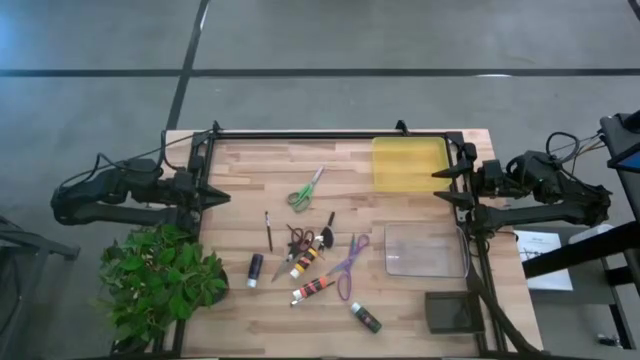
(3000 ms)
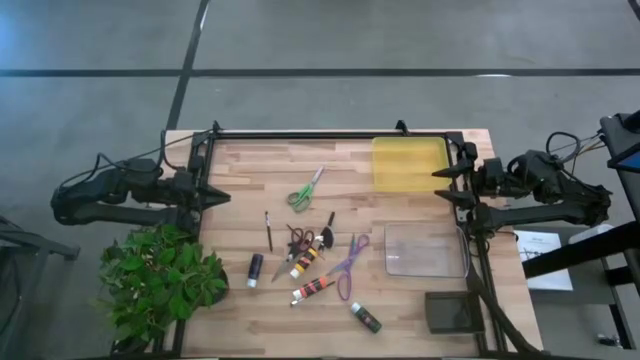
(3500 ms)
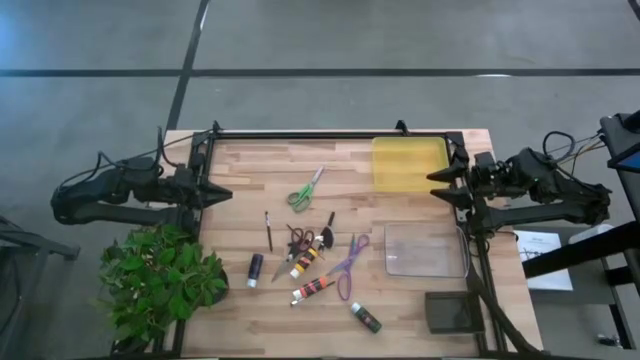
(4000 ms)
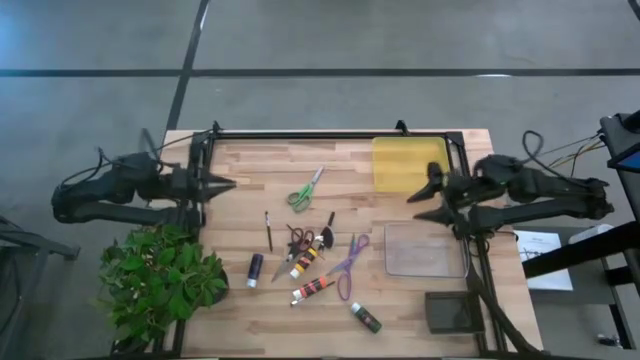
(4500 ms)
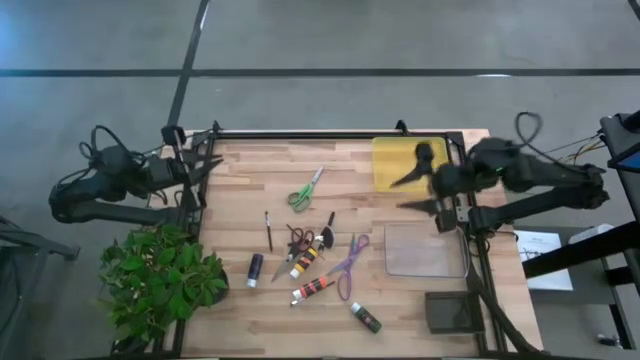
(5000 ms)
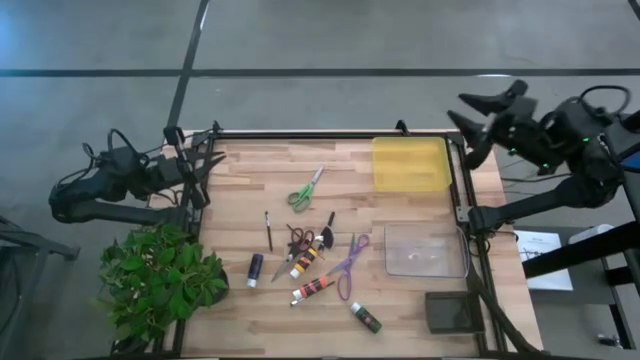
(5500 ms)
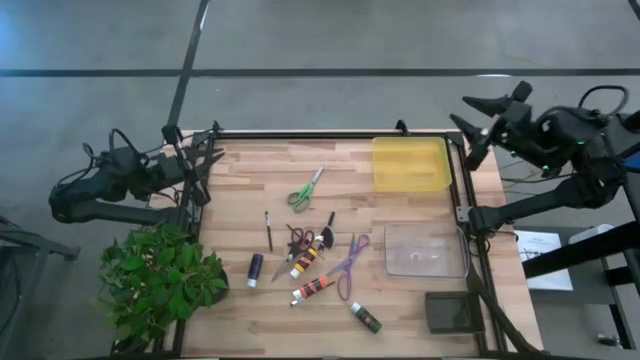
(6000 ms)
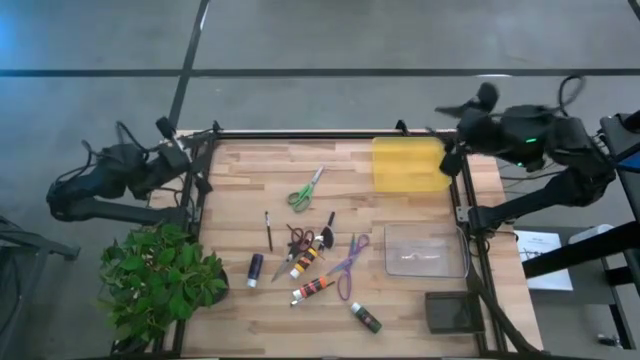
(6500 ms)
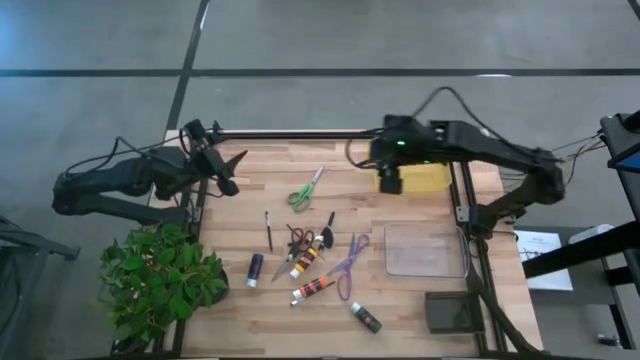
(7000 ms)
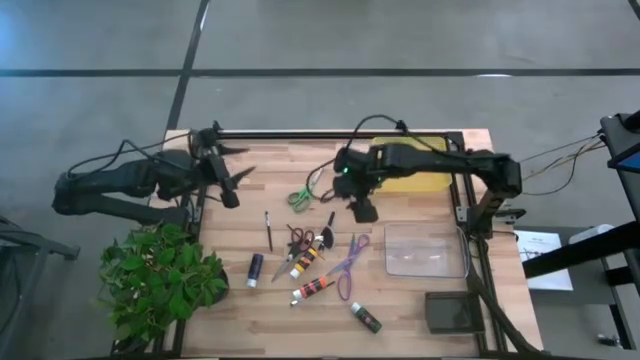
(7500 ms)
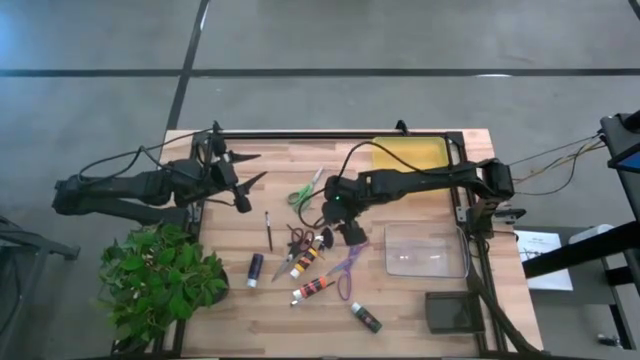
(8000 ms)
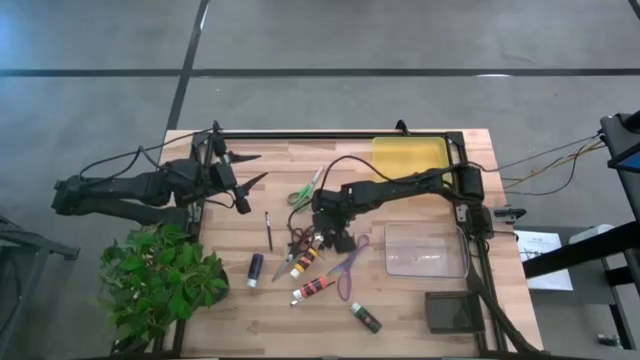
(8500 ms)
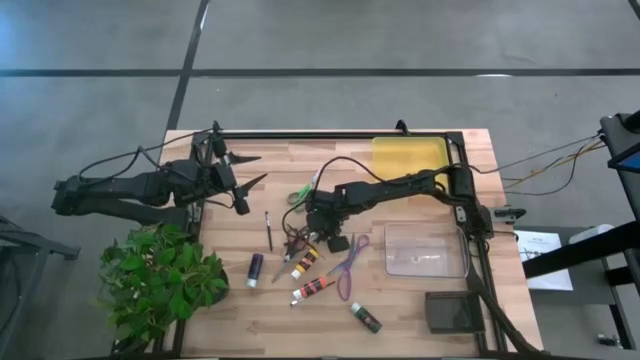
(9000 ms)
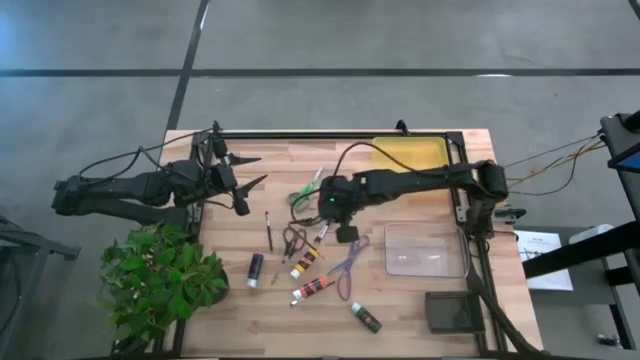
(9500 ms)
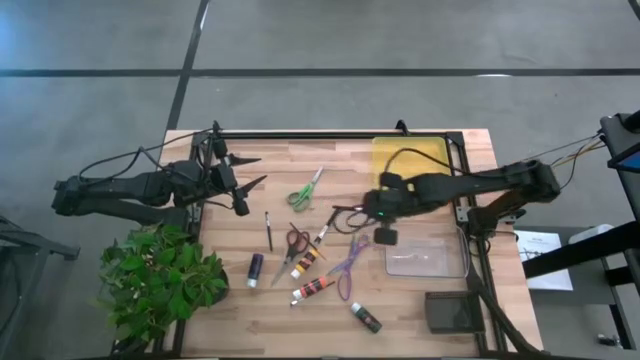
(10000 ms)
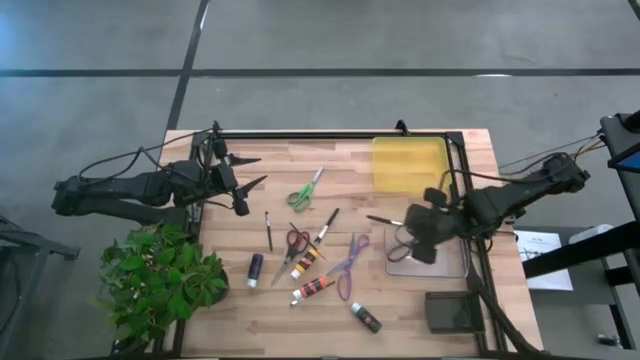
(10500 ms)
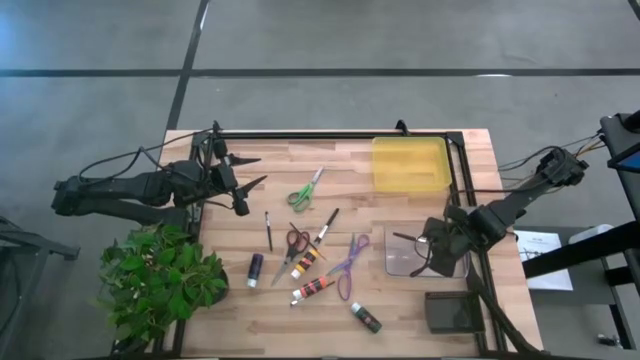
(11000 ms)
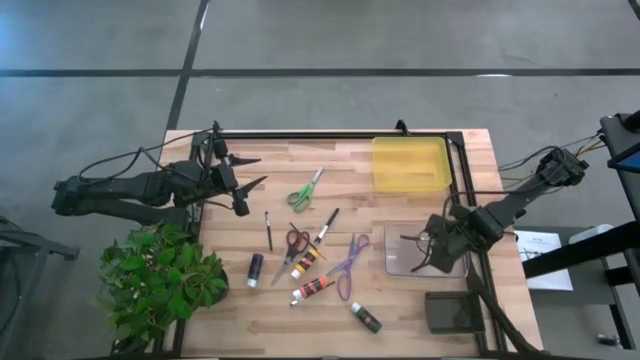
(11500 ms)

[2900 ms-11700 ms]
Task: Pick & Place Paint Supplies
Put the highlighter brush into the transparent bin

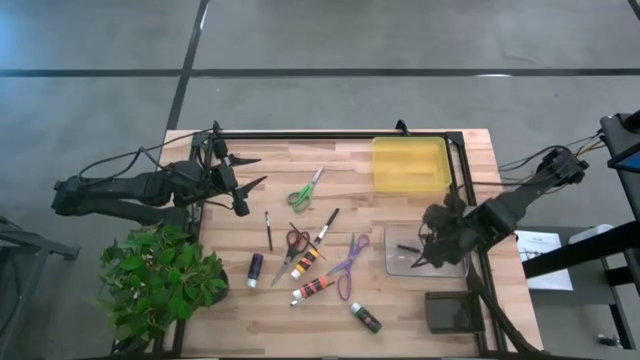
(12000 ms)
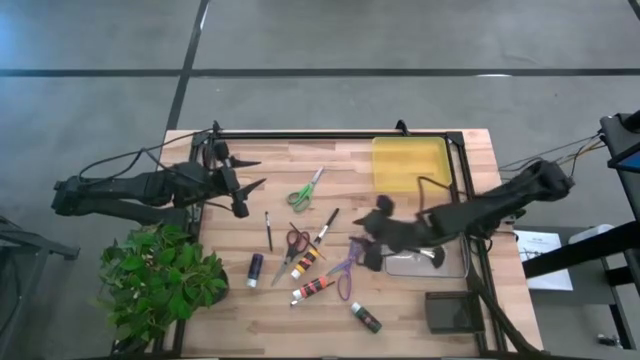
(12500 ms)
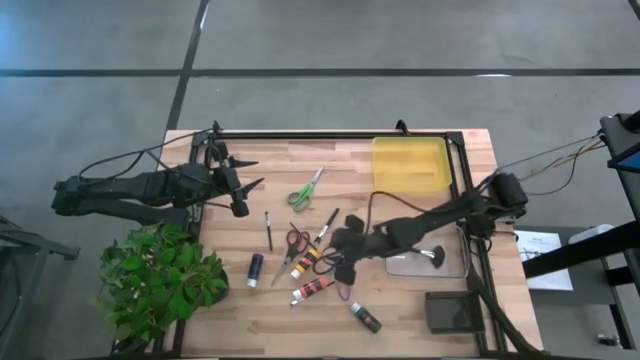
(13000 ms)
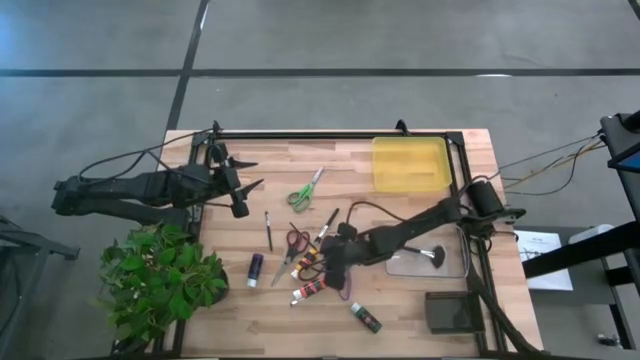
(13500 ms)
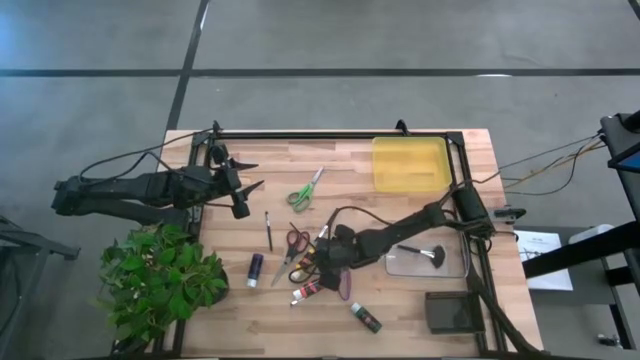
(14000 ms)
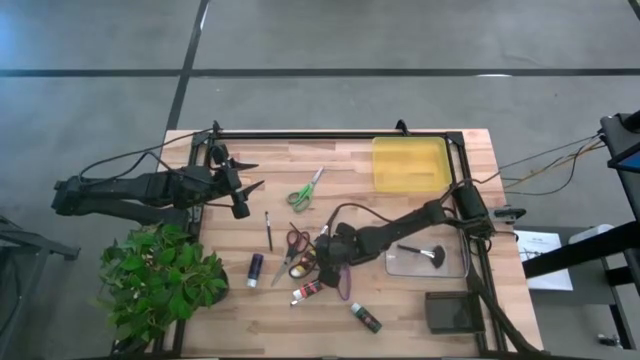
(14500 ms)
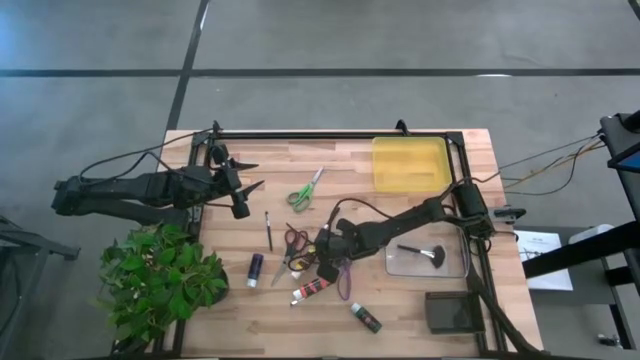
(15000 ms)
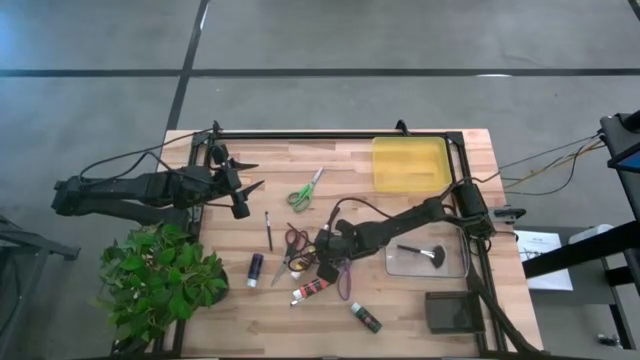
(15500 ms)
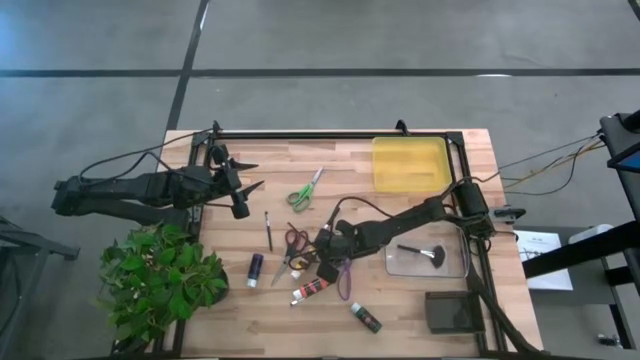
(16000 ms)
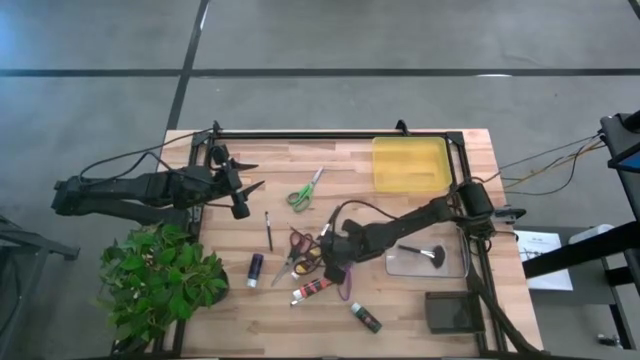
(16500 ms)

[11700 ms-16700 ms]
Put the gold paint brush into the transparent bin

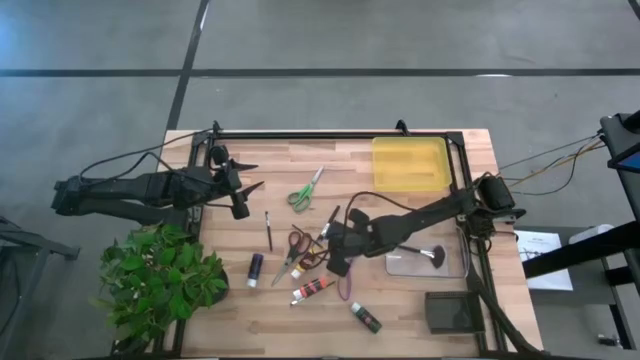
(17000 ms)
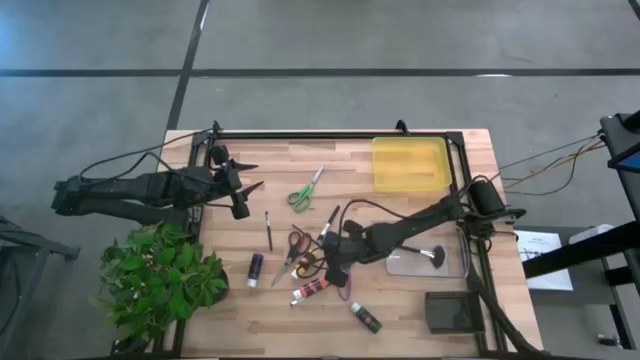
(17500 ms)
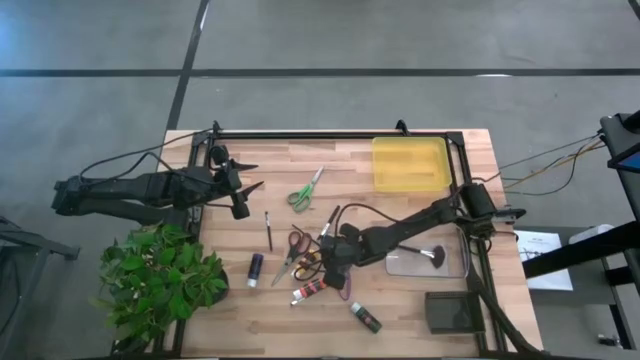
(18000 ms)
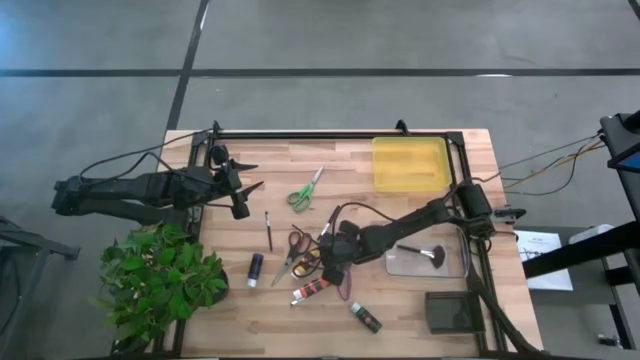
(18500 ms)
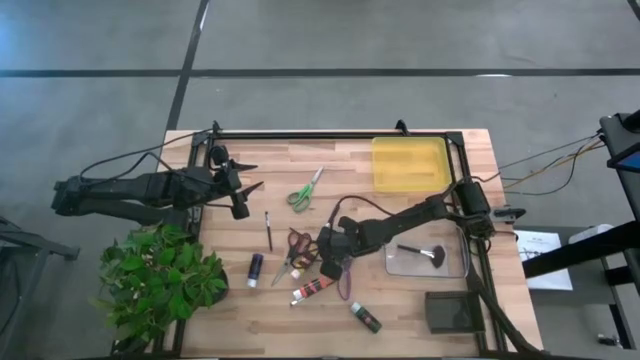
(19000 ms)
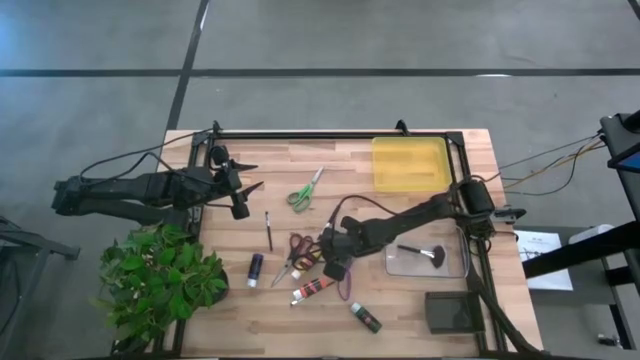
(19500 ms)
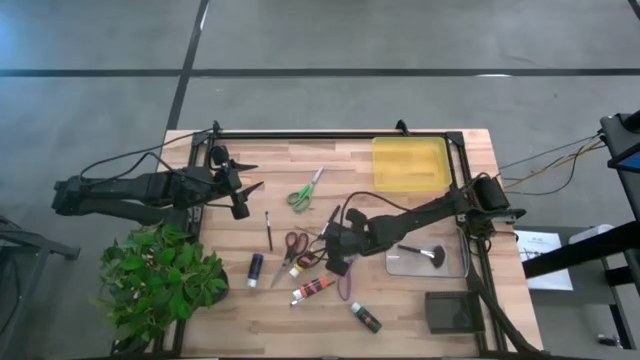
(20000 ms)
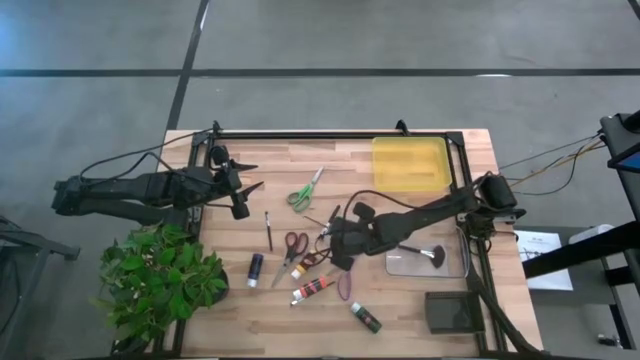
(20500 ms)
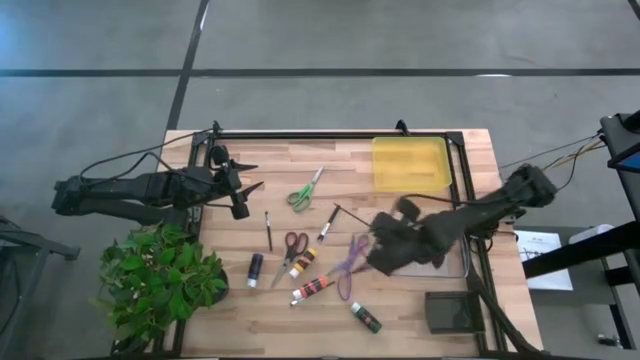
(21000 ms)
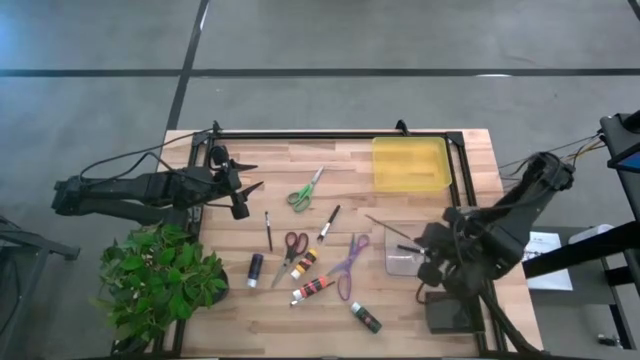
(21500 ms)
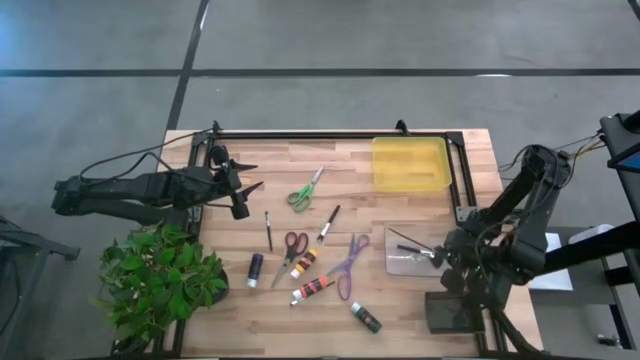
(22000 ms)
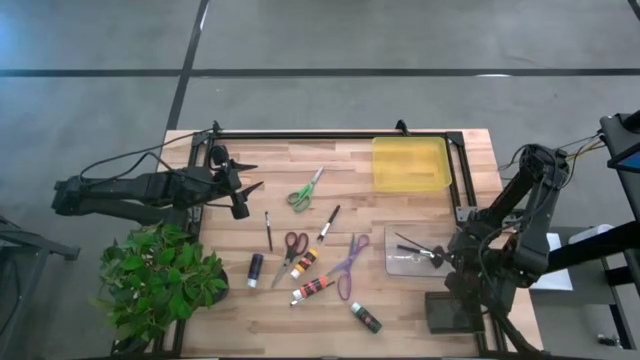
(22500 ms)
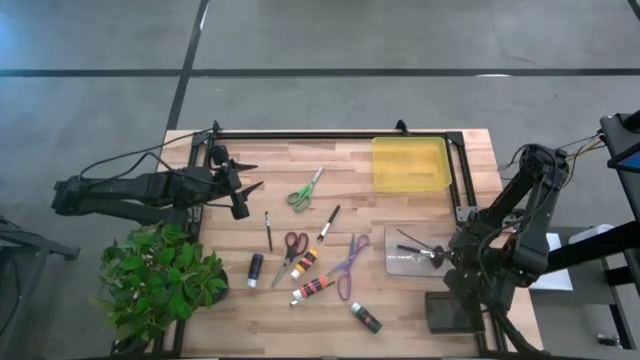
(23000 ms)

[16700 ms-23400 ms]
Put the gold paint brush into the transparent bin

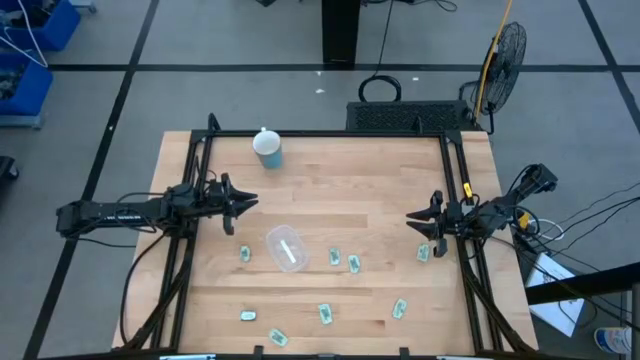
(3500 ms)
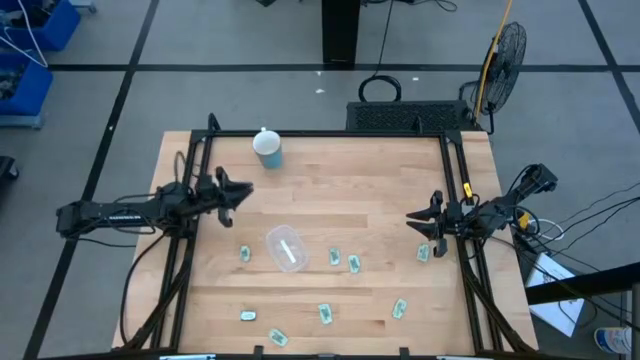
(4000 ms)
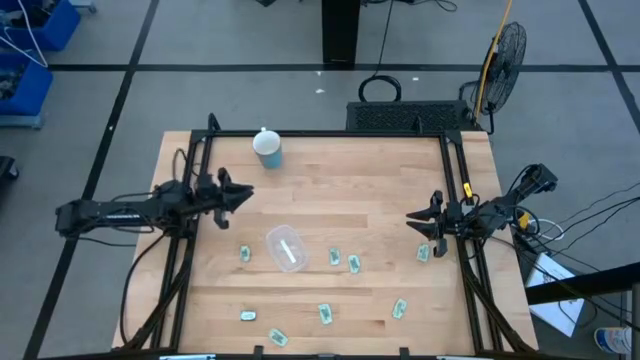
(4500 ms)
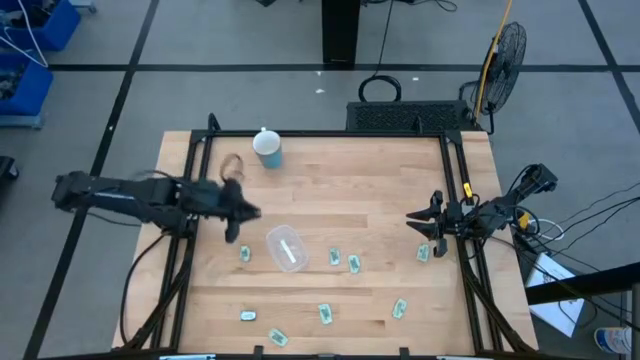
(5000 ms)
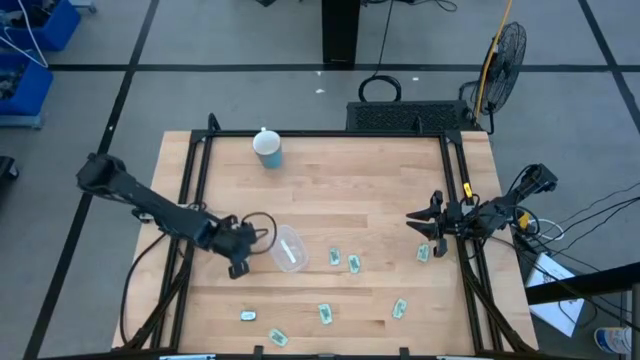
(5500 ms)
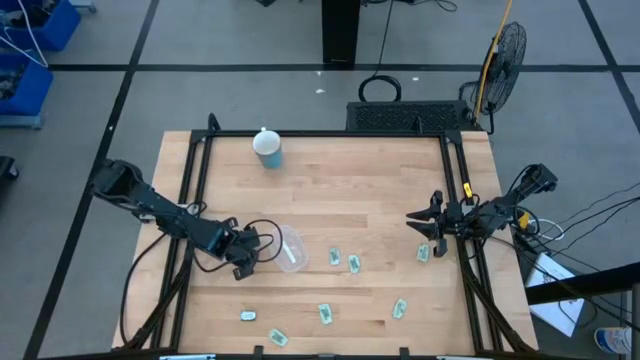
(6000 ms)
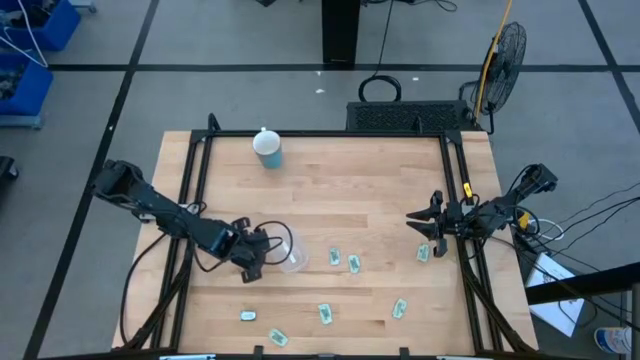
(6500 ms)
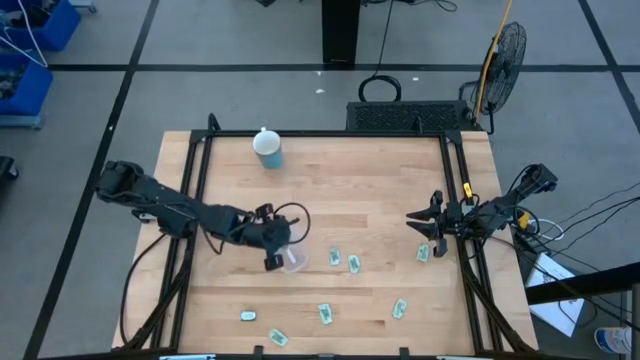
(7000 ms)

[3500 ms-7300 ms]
Task: Pick and place Stevia / Truvia into bins
Put the stevia packet into the transparent container
